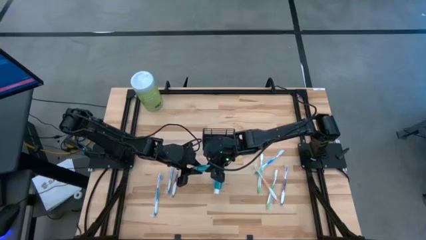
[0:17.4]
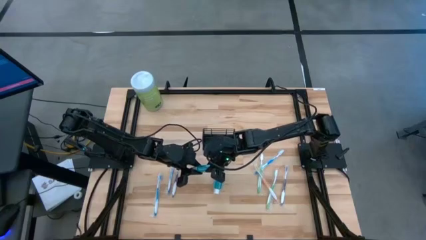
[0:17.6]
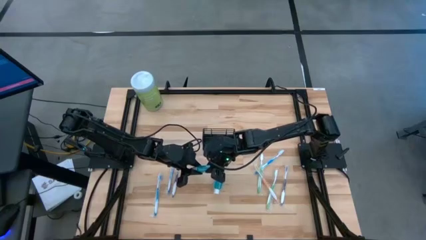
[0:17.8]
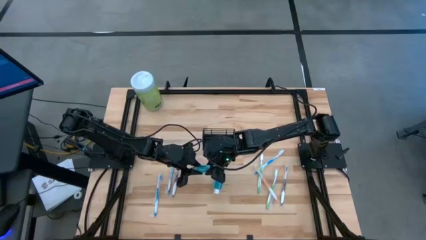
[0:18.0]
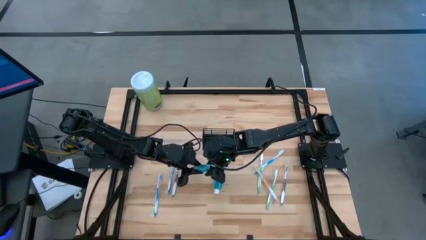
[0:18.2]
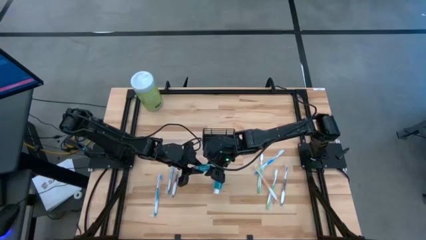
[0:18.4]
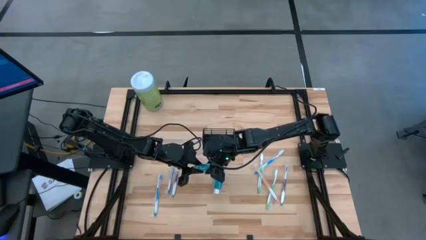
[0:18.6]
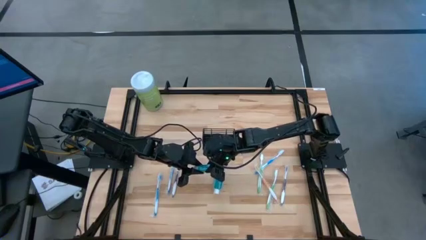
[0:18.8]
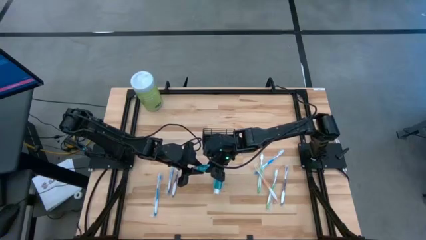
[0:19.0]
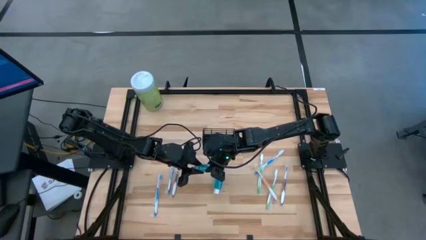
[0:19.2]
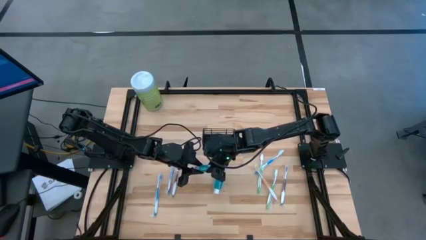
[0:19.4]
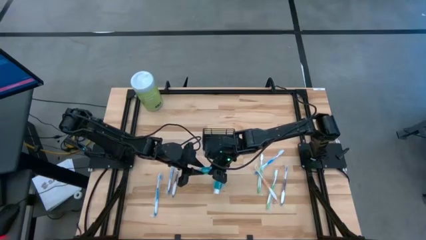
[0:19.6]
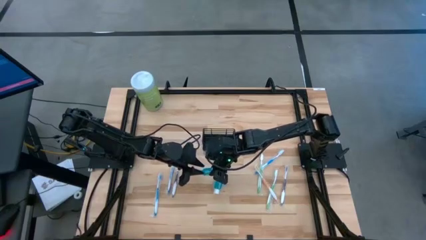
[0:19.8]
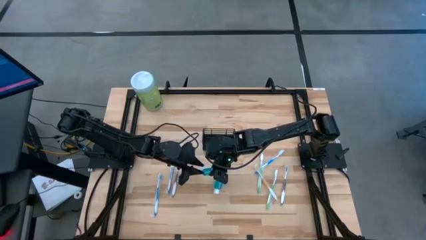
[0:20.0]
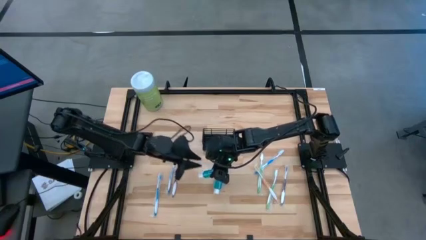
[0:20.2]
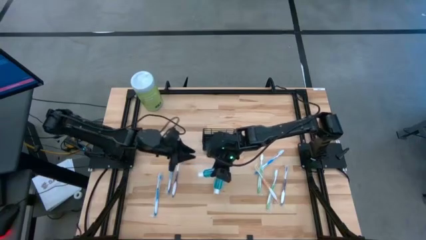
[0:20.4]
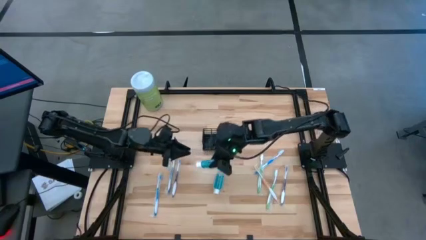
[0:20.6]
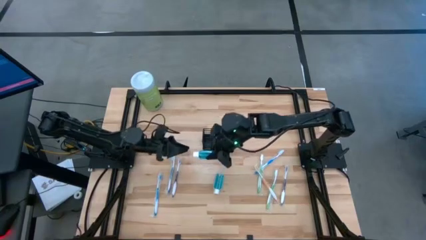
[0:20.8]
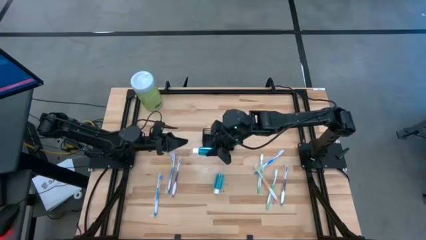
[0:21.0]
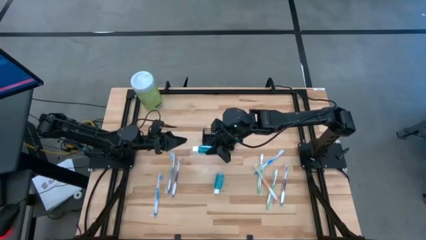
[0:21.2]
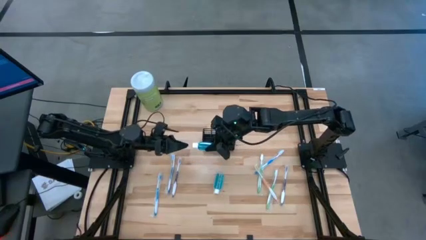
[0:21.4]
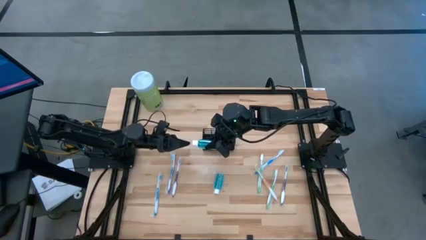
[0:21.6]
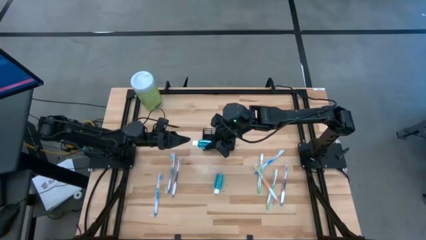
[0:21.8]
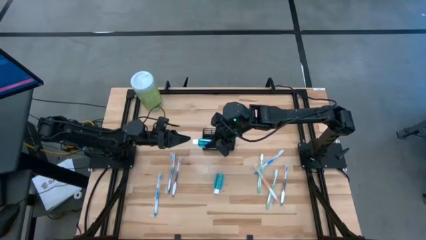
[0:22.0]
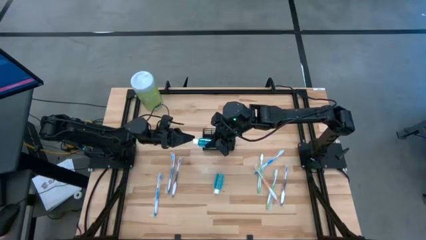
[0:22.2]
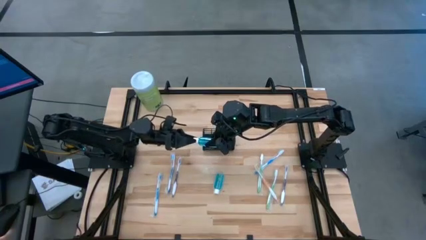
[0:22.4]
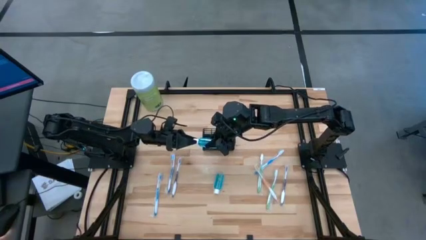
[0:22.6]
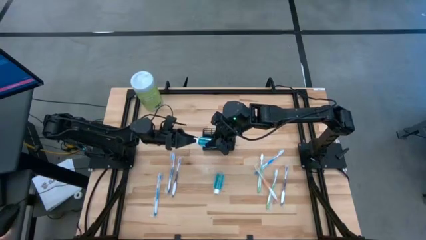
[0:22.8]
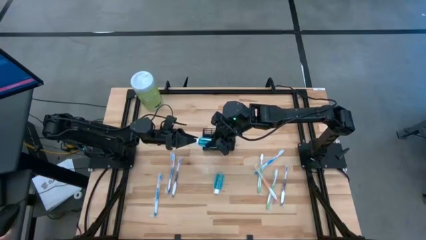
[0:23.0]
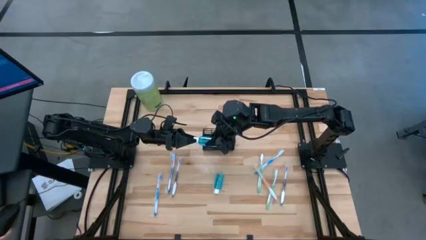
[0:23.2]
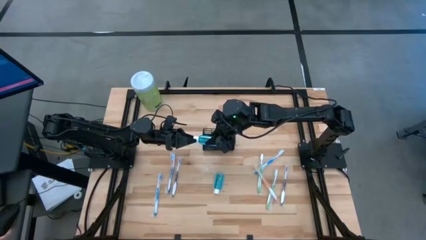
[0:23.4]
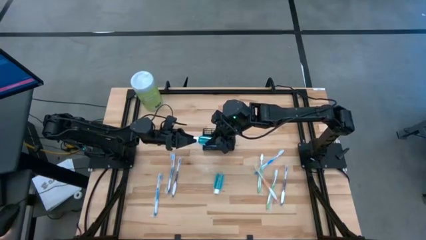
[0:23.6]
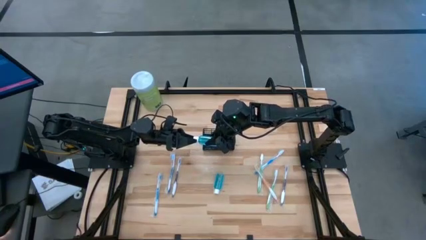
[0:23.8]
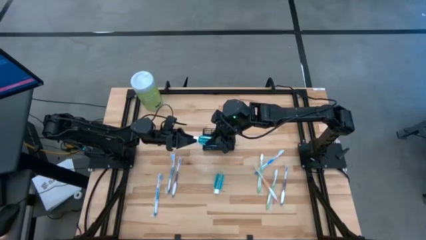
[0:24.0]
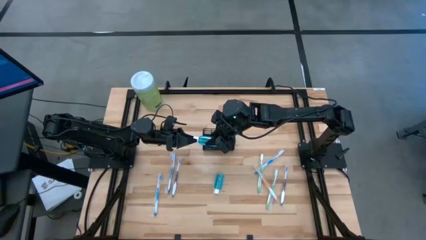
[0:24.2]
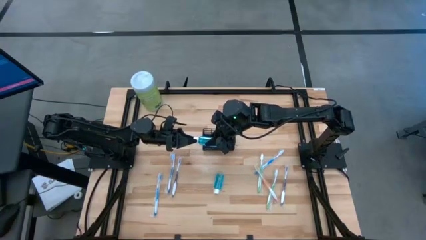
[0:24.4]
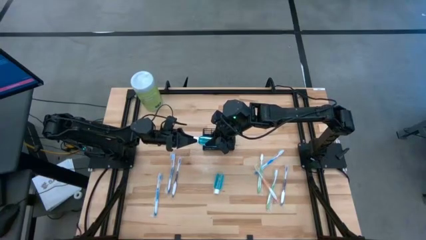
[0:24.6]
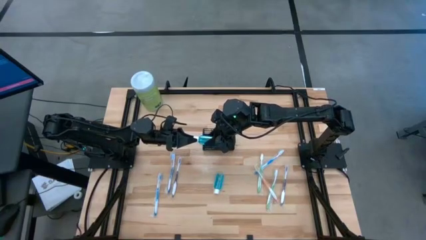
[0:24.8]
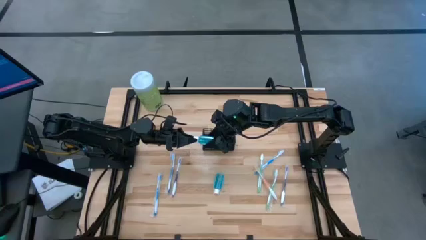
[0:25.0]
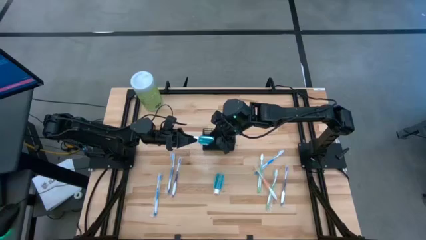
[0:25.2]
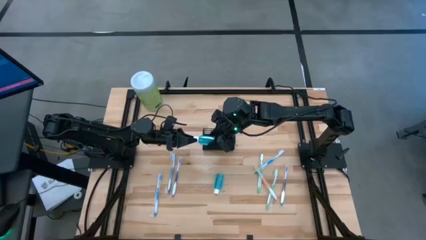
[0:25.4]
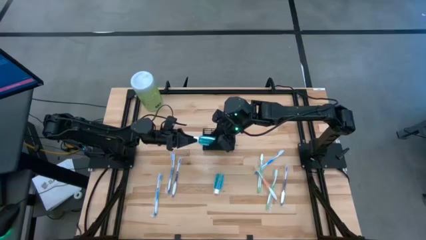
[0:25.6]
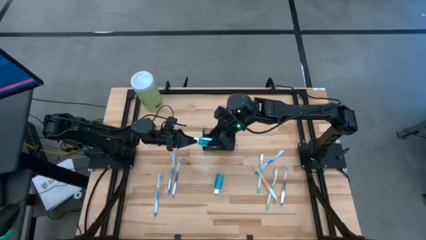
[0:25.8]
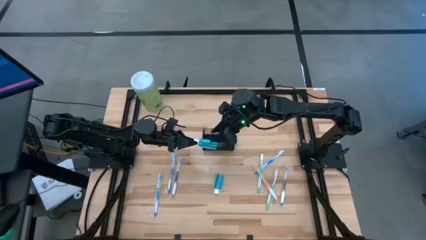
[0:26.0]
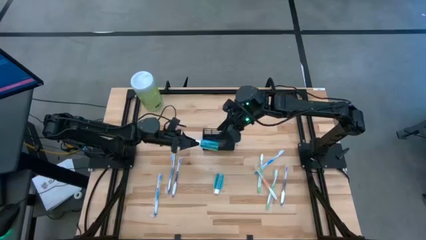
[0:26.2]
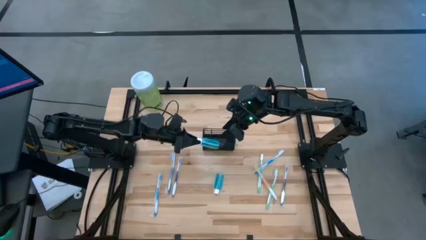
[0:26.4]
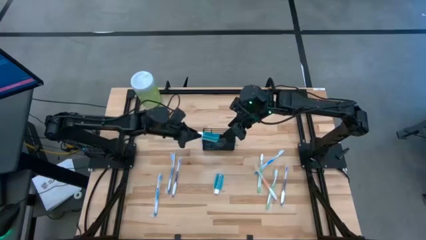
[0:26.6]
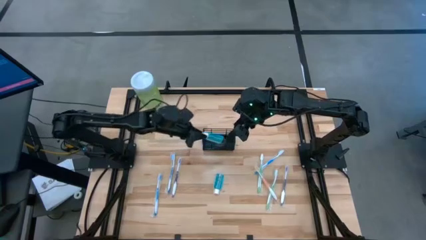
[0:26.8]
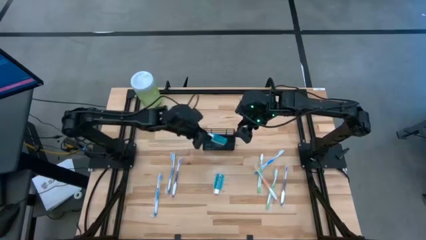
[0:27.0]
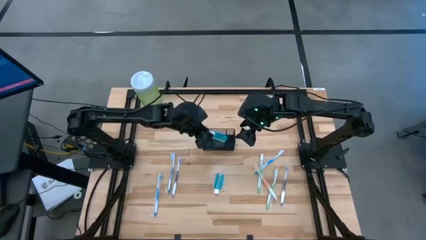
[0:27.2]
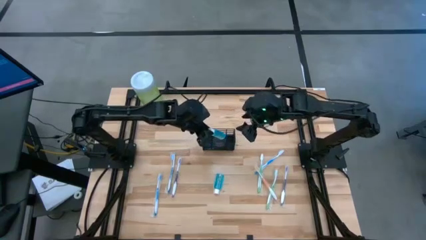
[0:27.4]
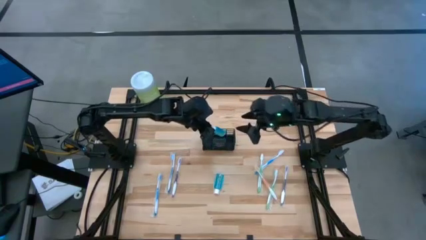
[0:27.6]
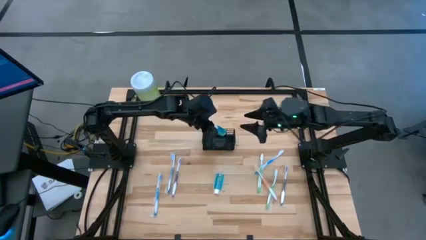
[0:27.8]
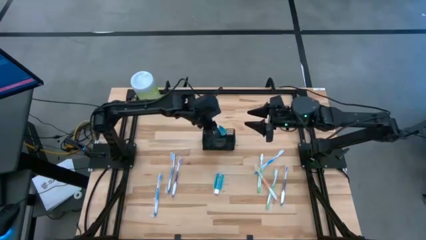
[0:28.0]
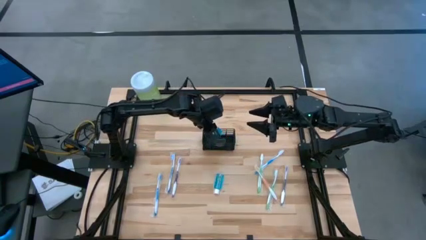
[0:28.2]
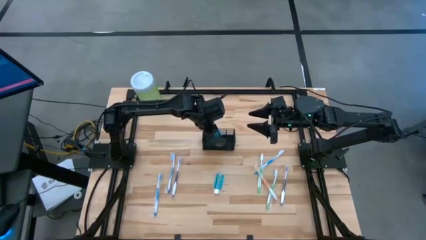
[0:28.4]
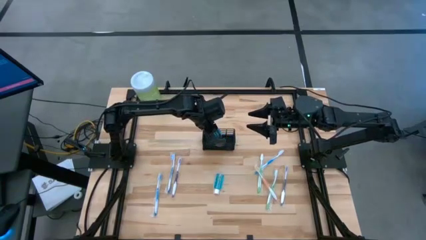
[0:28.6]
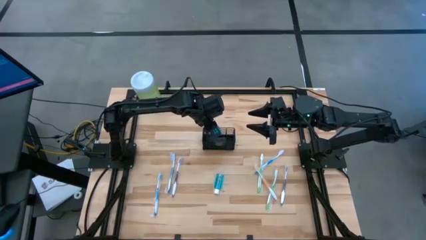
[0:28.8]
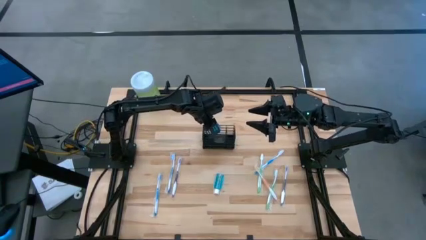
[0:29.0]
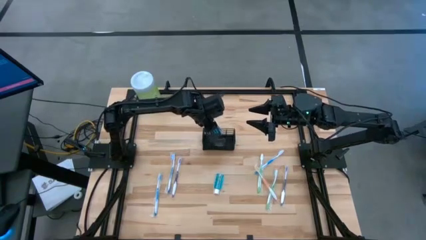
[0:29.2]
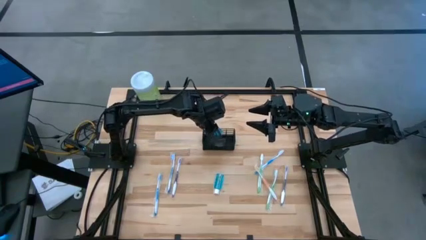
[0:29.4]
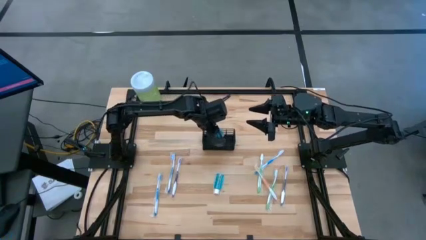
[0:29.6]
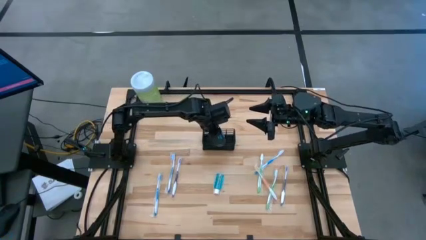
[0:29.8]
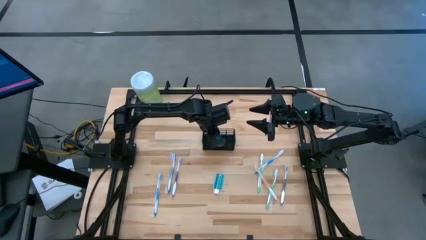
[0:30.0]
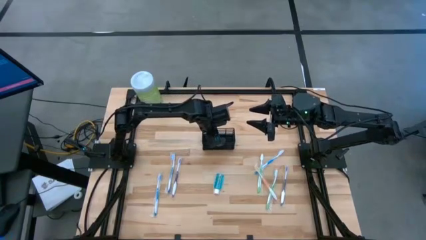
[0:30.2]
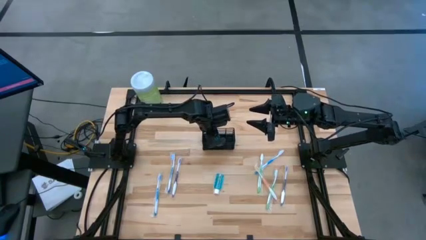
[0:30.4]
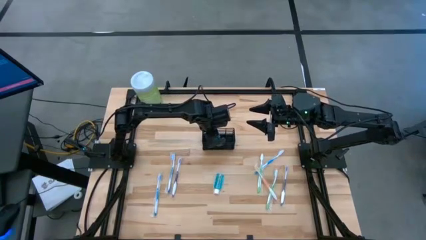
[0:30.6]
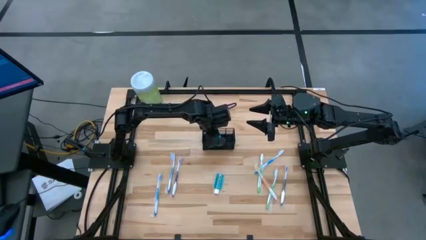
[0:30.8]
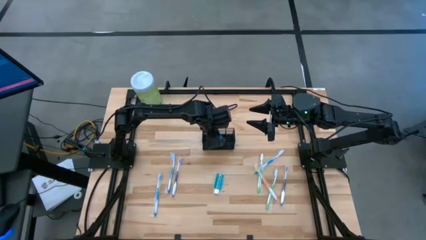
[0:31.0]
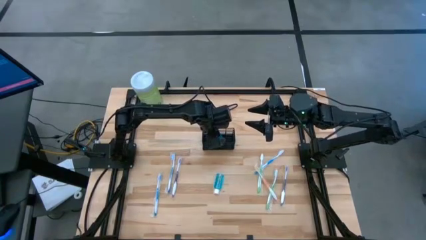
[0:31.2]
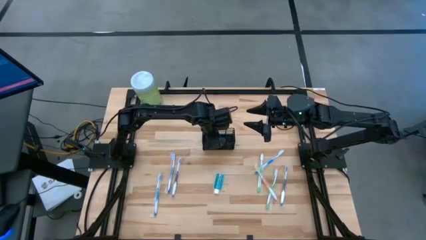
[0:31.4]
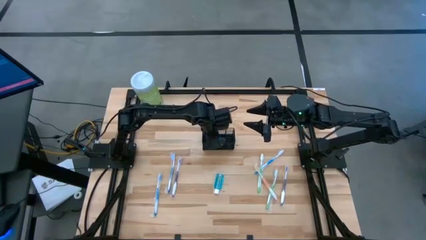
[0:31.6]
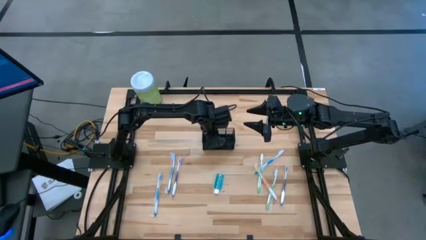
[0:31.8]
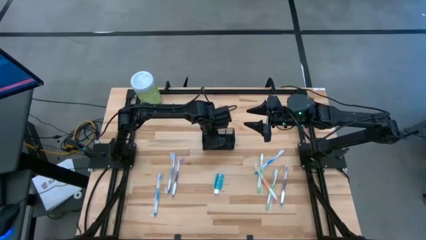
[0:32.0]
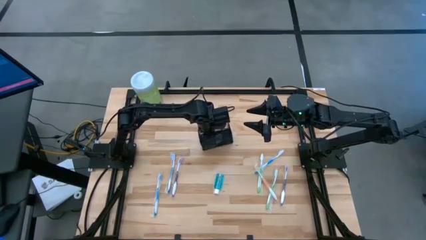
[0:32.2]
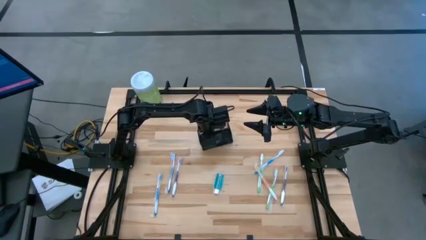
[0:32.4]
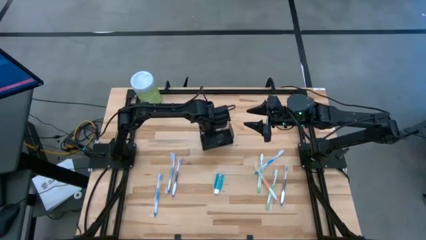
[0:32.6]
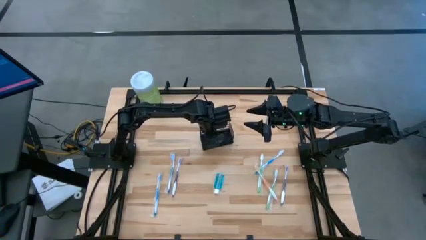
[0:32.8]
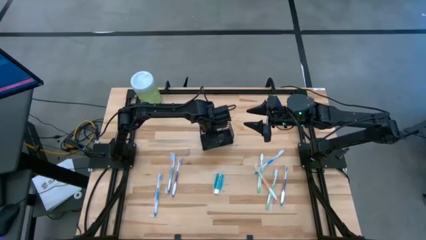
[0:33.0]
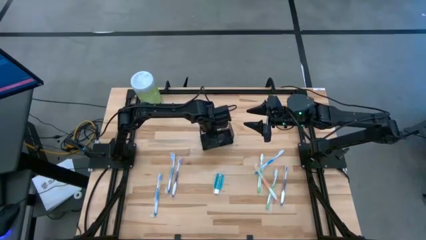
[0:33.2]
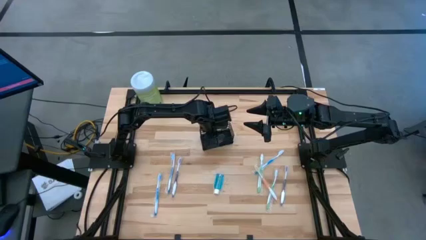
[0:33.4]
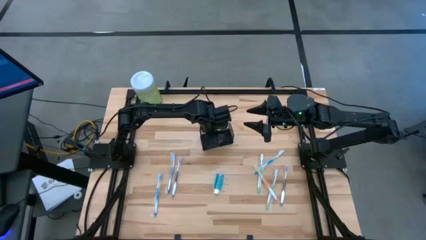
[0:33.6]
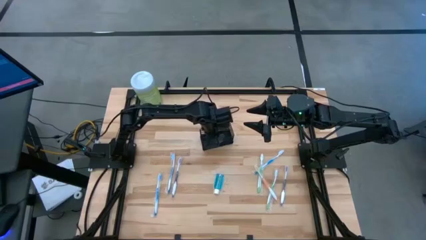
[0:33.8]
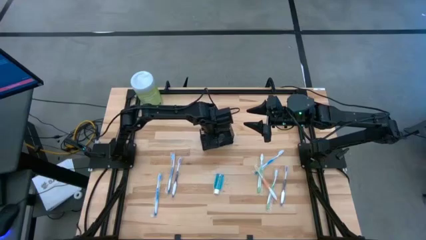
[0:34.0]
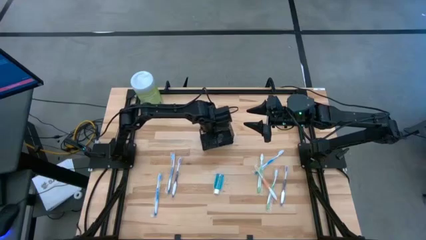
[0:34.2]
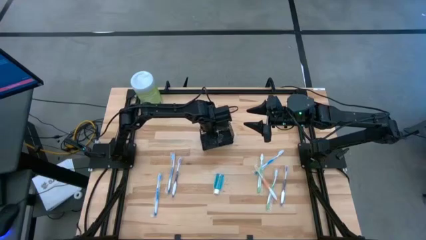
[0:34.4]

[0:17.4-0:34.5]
Task: Pick & Place toothbrushing station
Put the left blue mouthwash into the black mesh organizer
